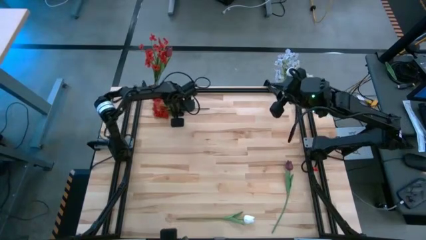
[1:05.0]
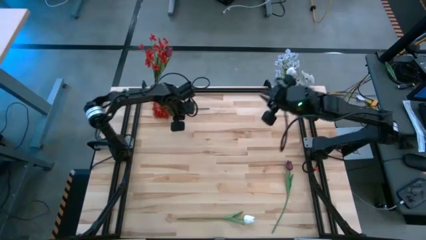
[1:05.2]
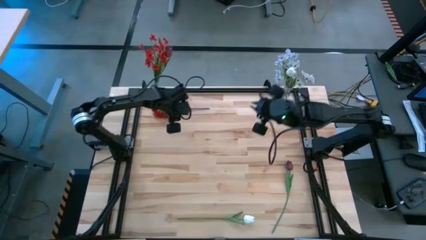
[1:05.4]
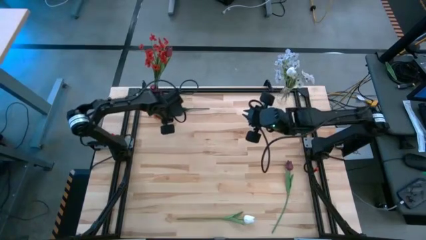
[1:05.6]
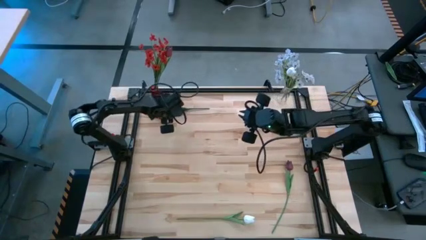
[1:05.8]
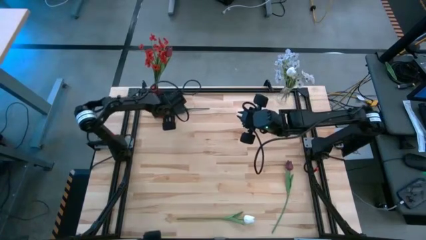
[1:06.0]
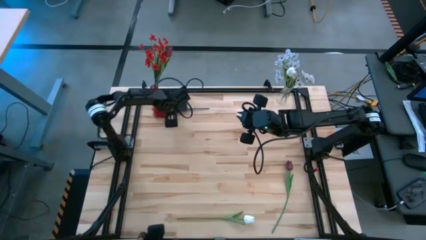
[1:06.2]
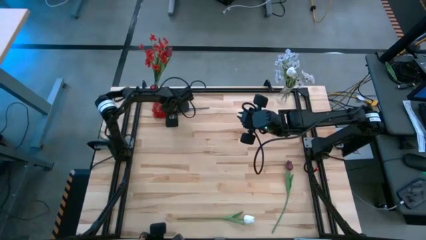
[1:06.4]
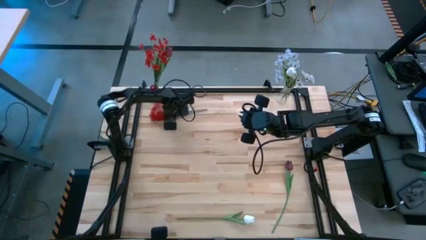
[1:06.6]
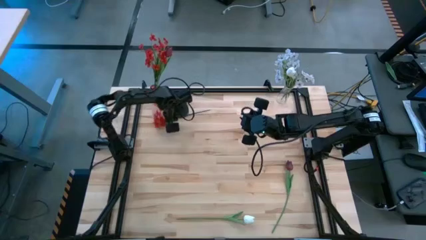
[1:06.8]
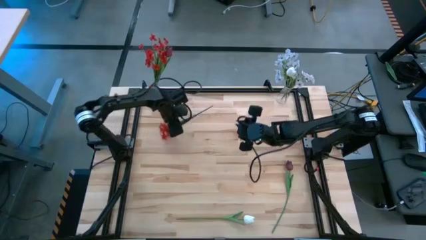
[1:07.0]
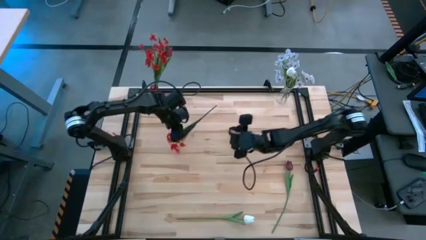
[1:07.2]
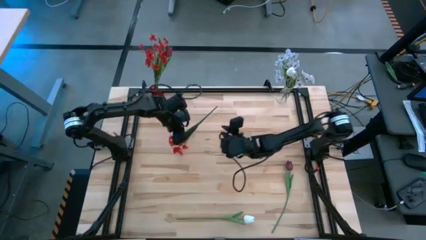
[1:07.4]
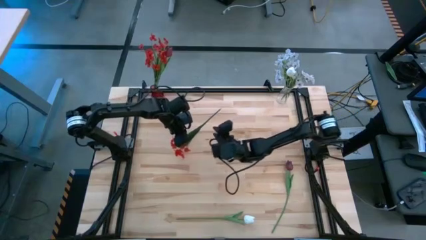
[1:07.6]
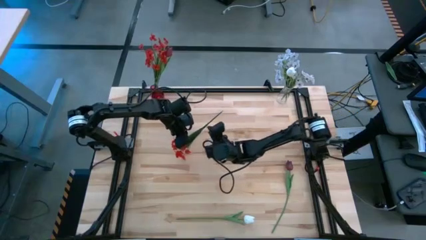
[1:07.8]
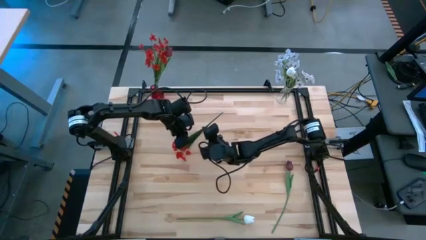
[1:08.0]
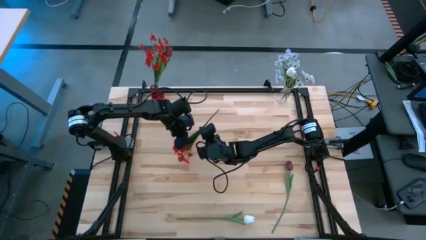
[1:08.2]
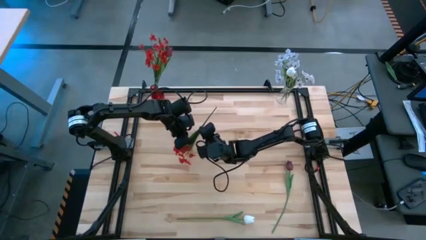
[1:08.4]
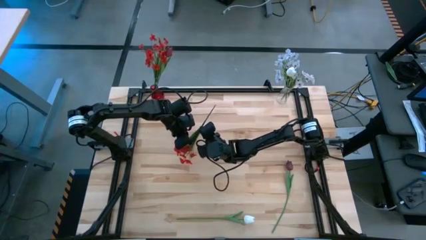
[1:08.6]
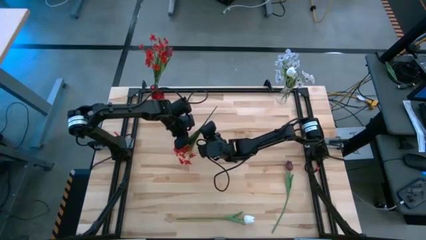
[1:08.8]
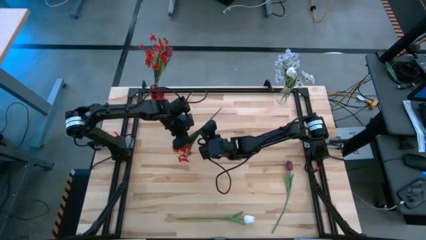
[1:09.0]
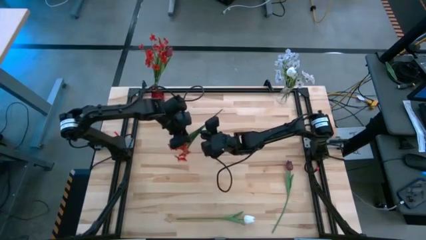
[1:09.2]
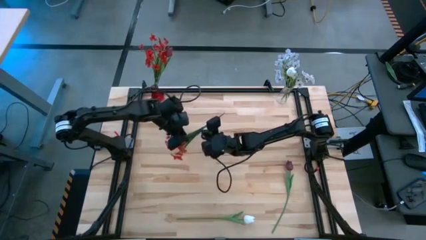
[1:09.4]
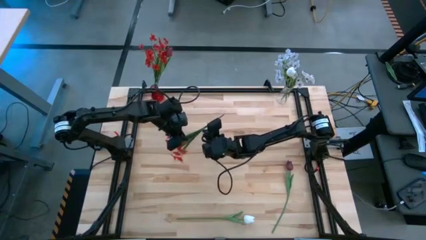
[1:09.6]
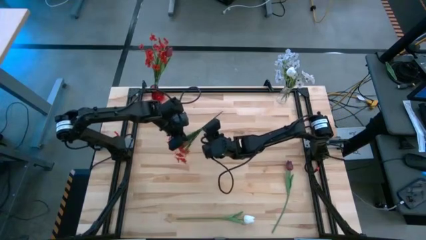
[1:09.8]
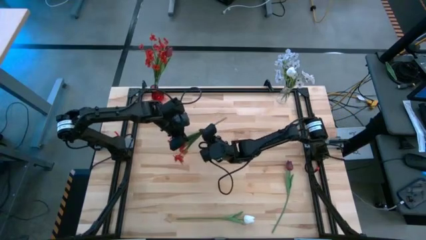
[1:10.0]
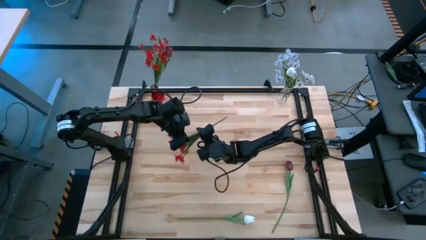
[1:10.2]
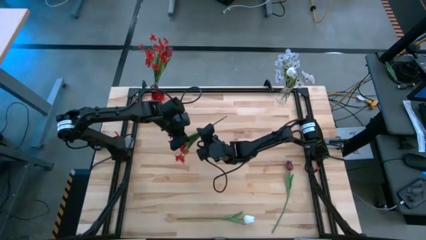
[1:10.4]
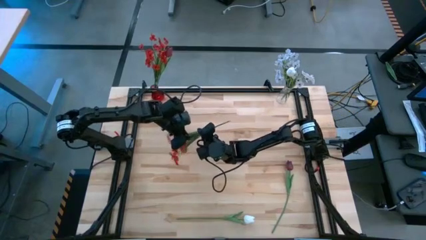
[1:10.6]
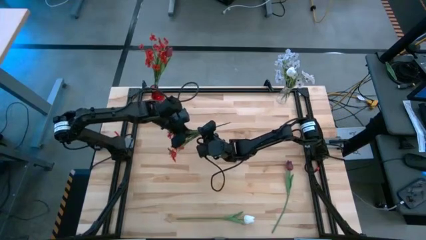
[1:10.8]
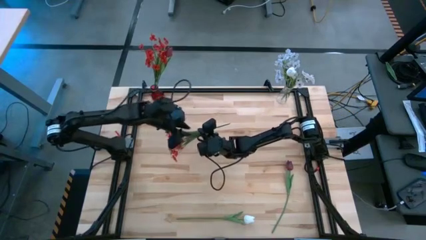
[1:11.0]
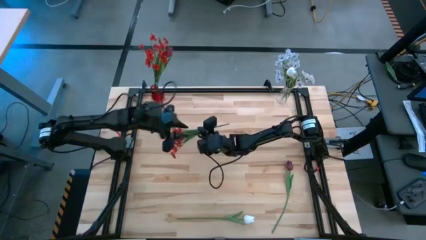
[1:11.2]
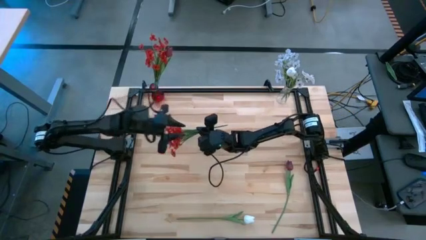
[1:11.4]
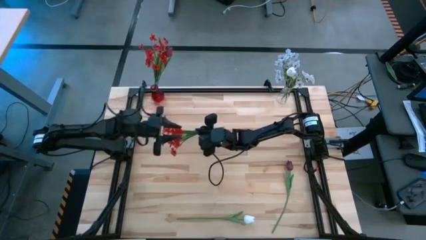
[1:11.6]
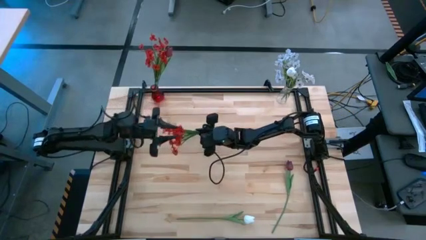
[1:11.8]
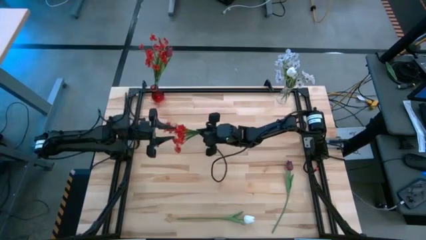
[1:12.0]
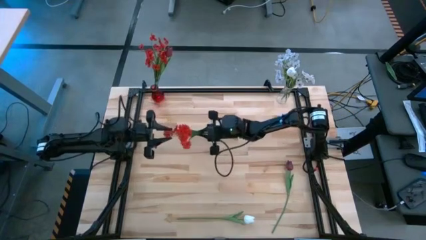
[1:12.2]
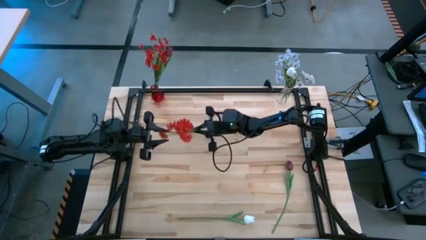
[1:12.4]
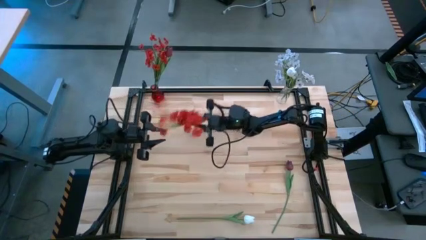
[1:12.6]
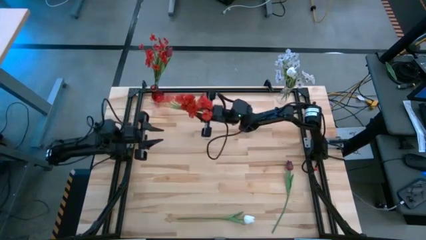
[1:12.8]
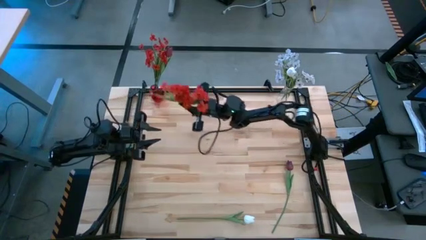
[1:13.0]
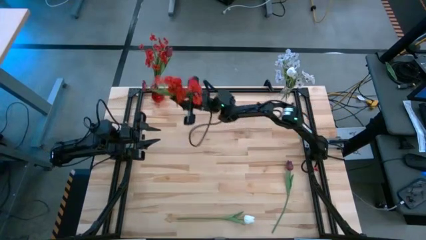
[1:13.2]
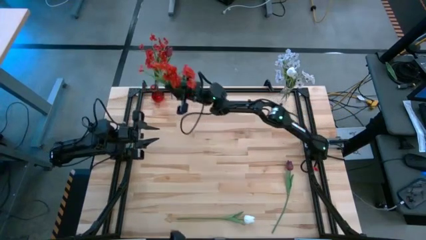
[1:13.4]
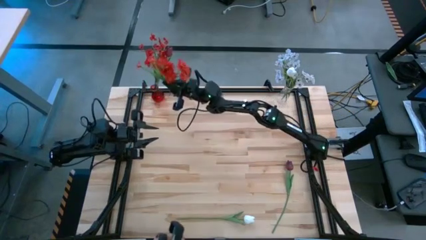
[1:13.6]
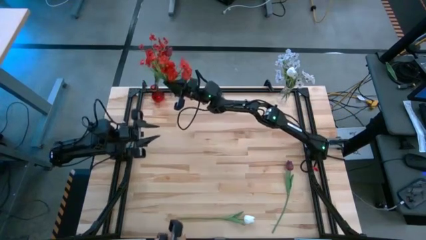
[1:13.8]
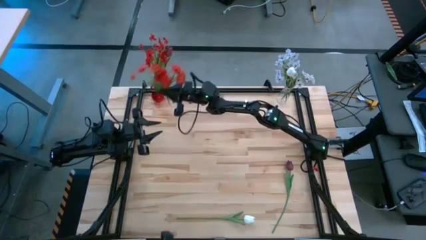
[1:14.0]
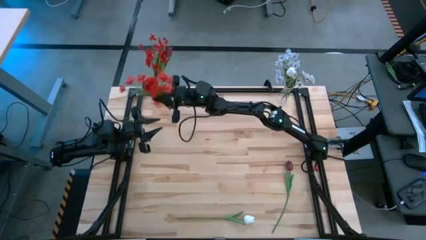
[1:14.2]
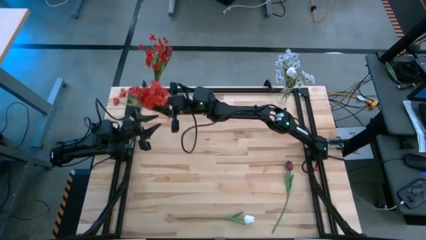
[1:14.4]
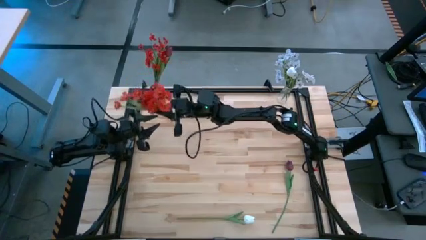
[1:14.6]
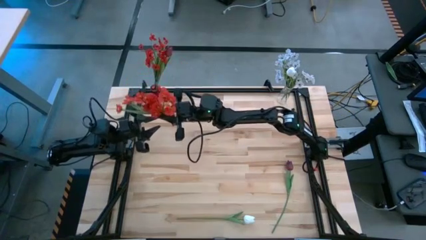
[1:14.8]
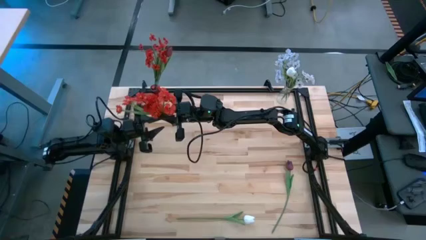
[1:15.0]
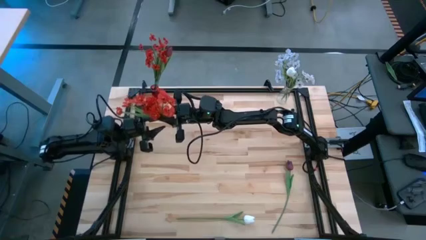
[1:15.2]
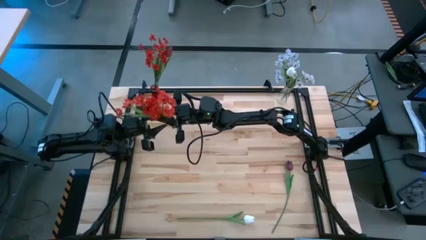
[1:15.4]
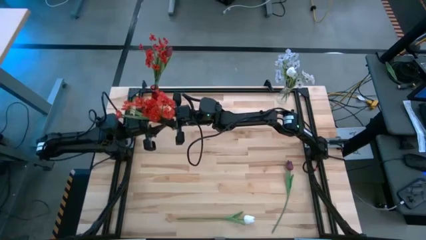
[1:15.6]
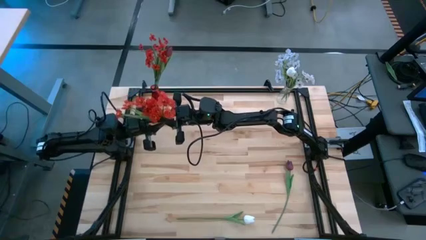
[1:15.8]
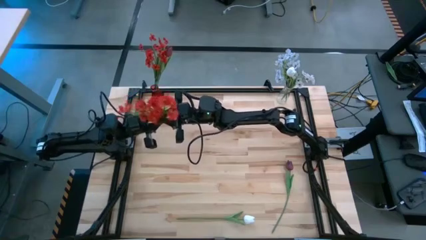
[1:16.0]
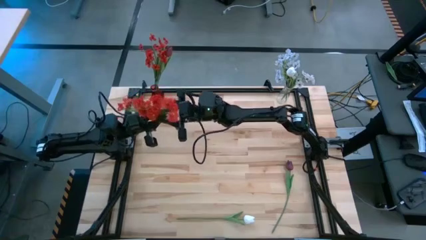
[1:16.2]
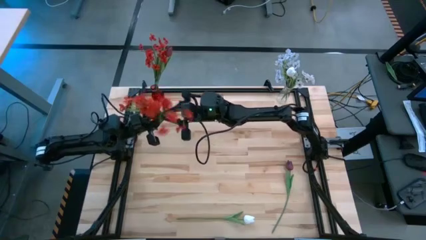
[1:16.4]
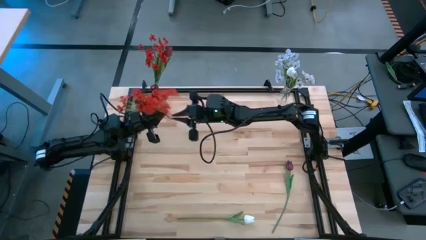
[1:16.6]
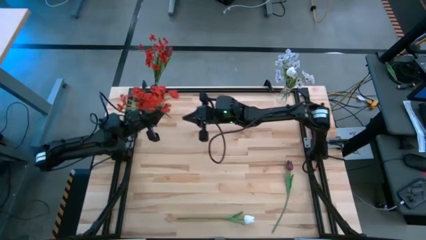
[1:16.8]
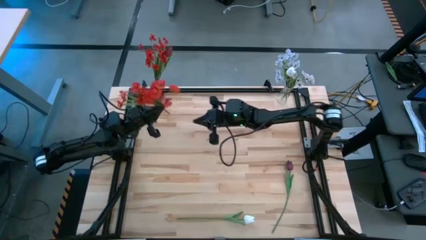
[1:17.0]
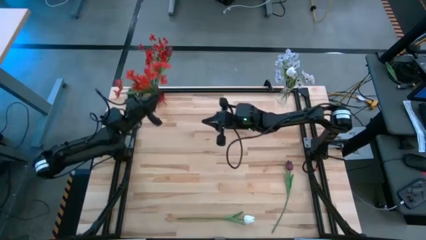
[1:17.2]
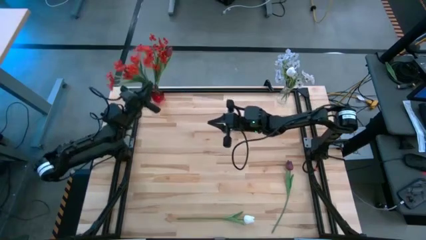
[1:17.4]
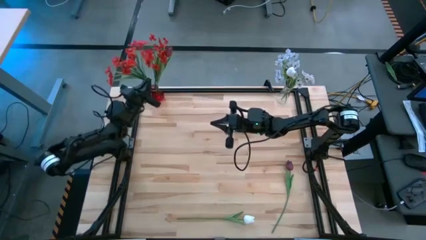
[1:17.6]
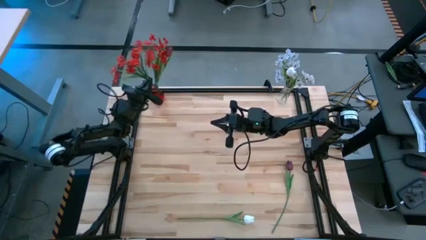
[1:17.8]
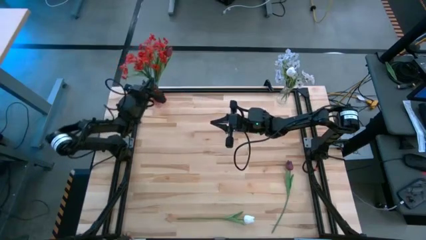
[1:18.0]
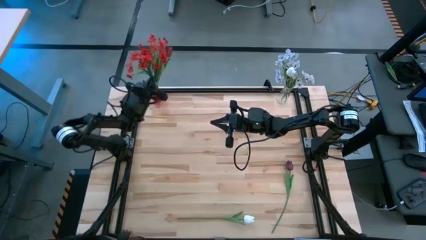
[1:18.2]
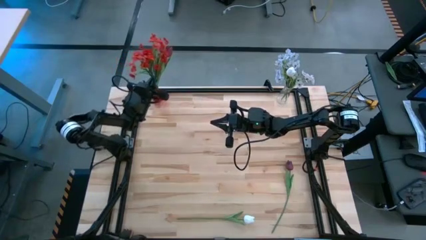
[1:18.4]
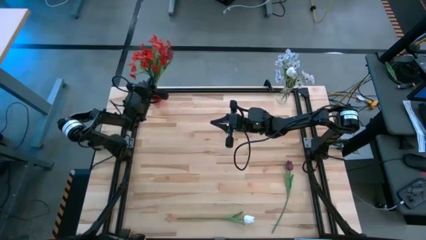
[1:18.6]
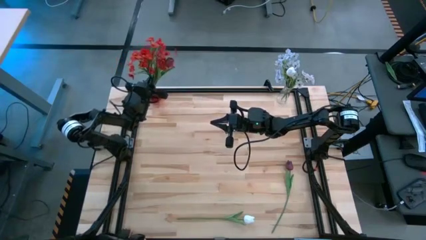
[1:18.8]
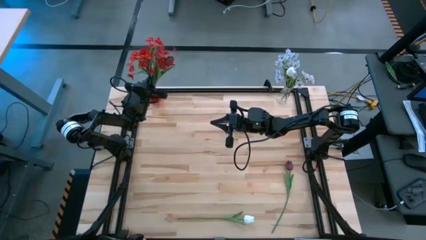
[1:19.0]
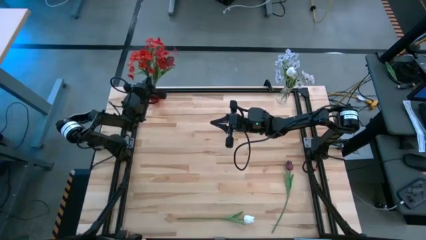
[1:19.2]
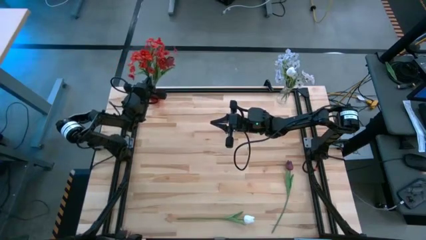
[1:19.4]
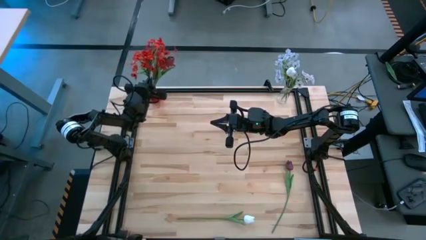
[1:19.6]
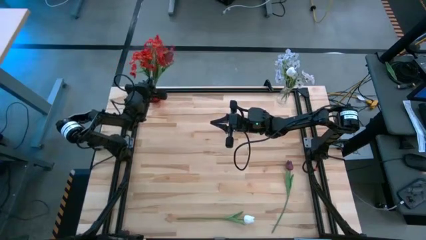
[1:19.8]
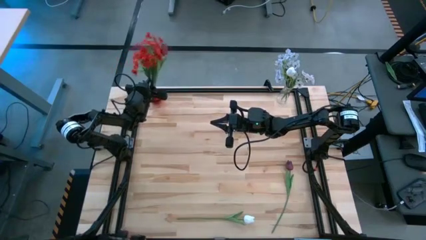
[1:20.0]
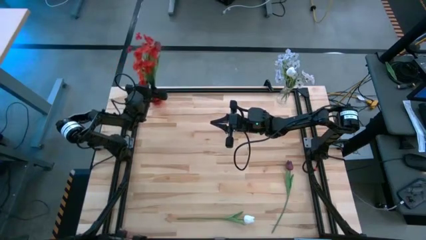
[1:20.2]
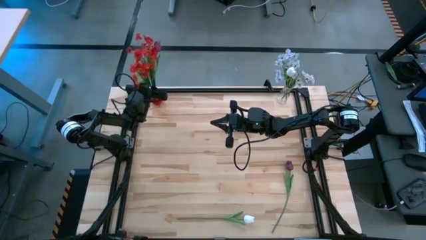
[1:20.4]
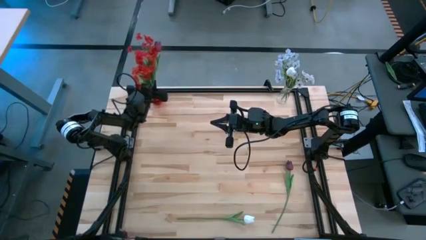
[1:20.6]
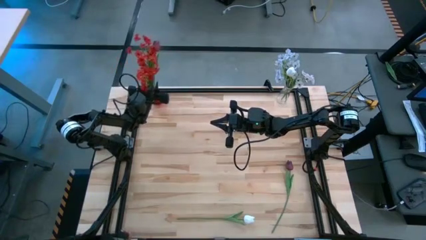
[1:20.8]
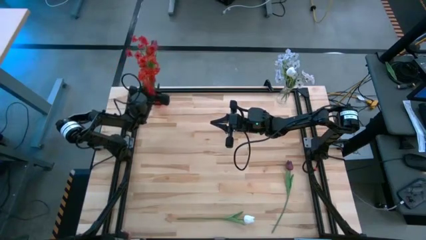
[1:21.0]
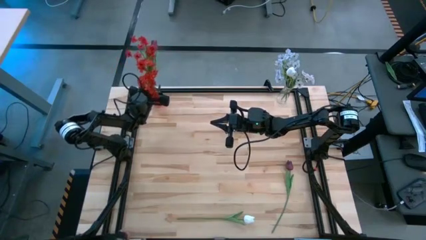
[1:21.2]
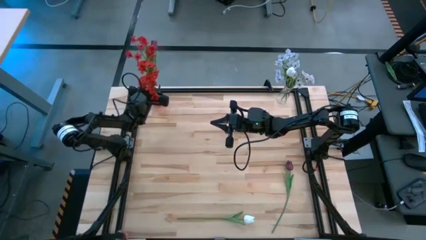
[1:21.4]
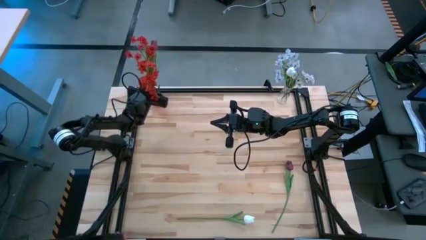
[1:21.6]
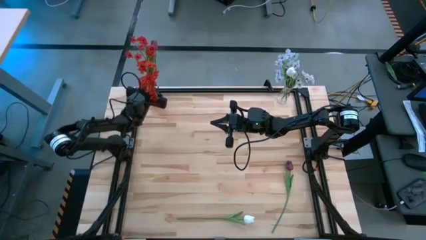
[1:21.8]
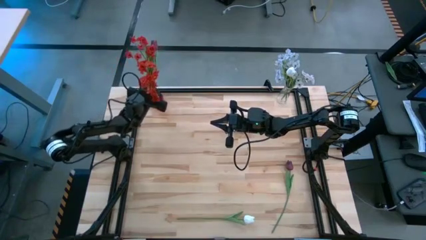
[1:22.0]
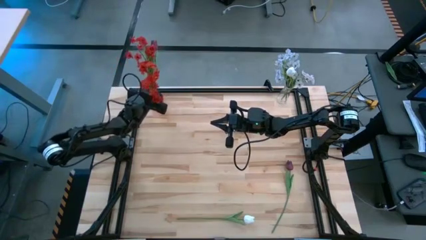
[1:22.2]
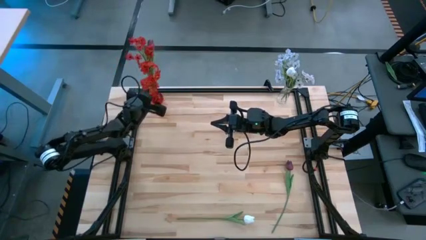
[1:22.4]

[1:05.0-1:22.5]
Task: Sort flowers into vase by color
Put the red flowers into the red flower vase
